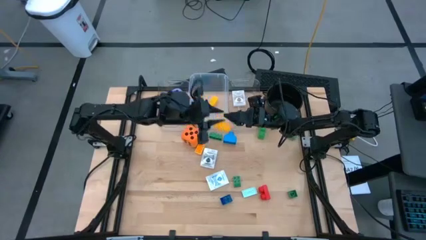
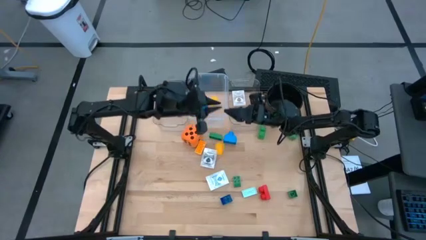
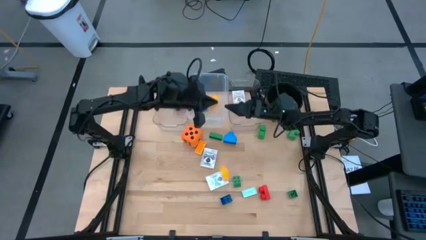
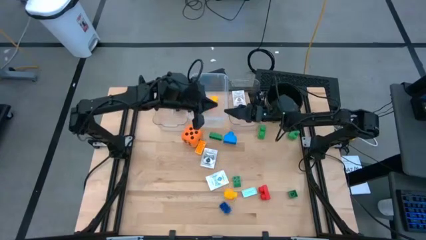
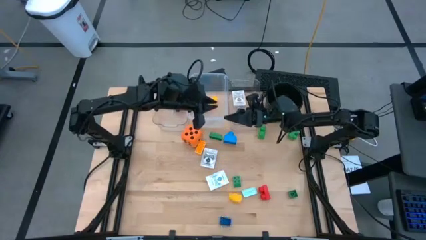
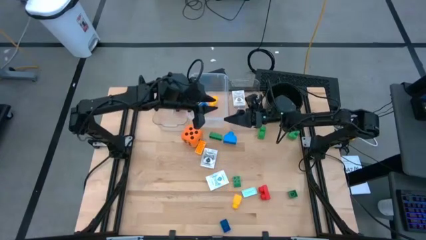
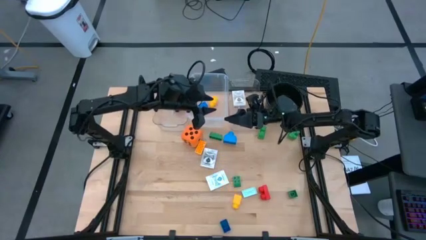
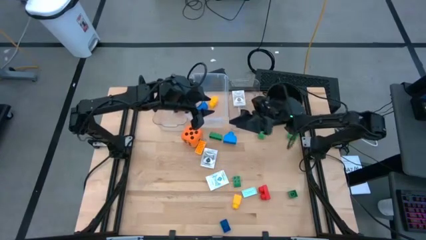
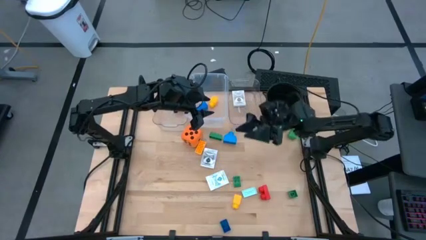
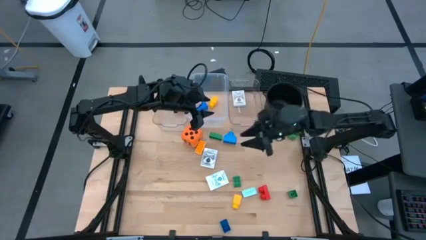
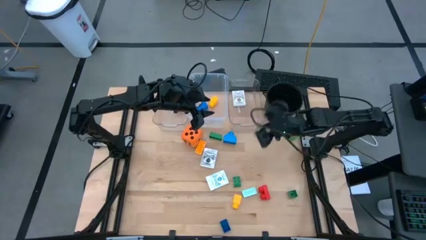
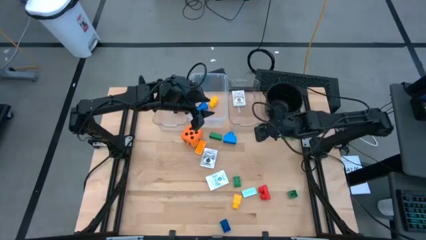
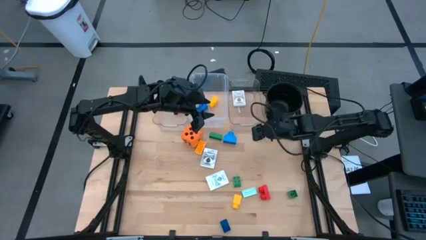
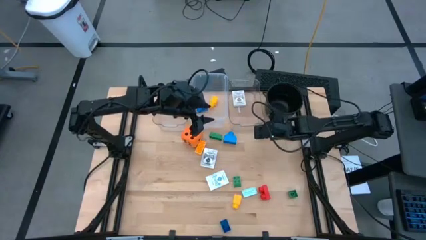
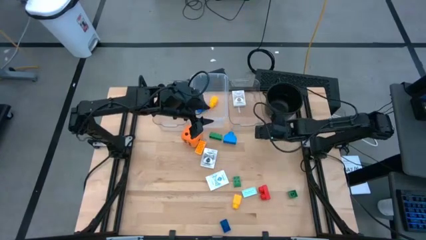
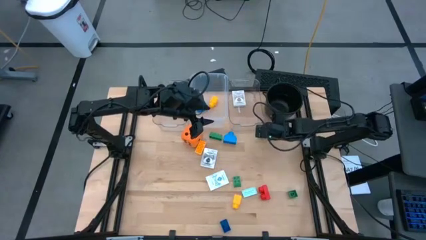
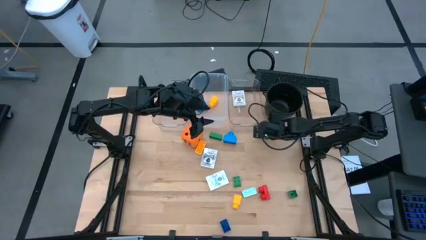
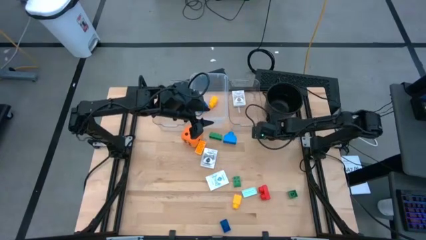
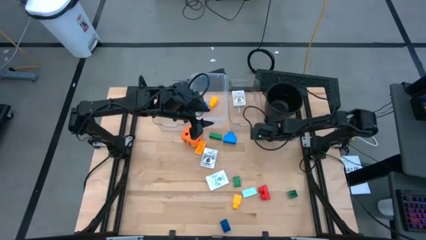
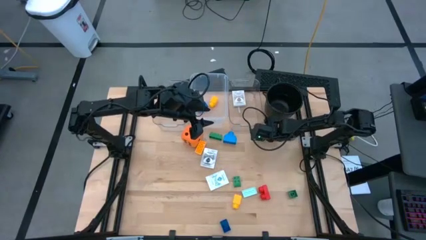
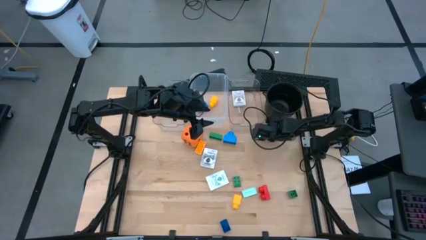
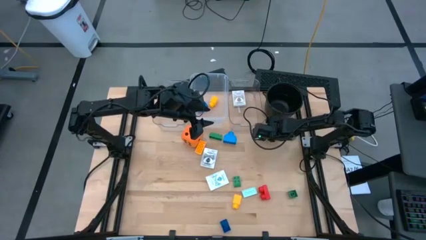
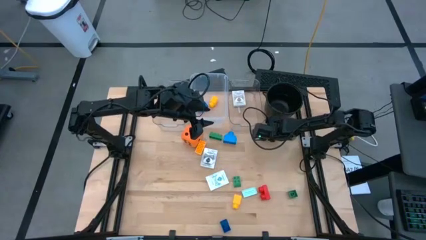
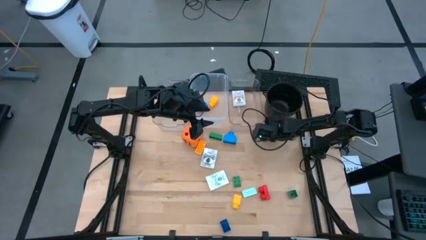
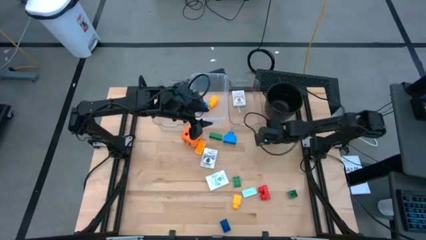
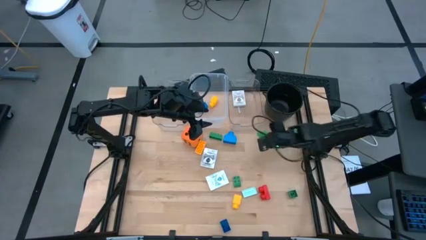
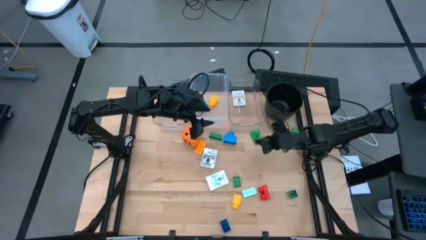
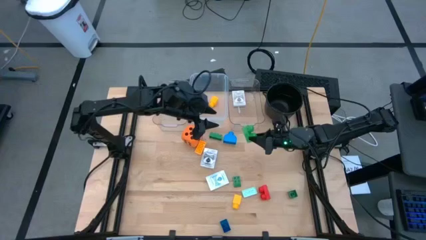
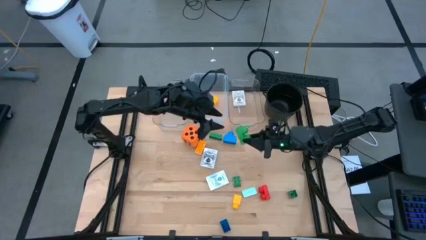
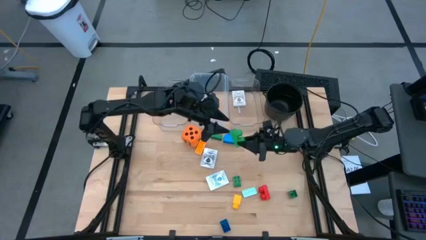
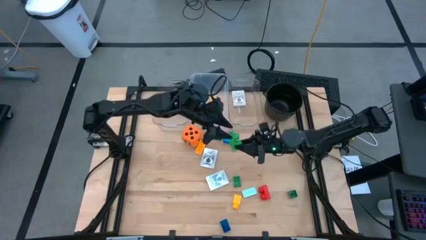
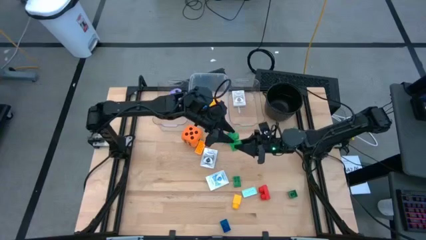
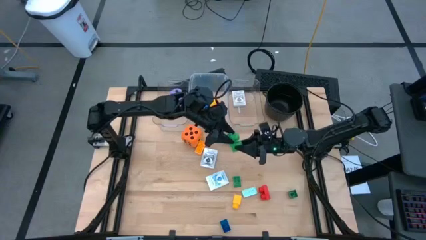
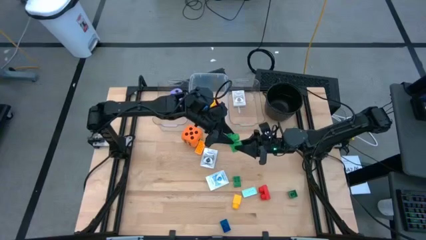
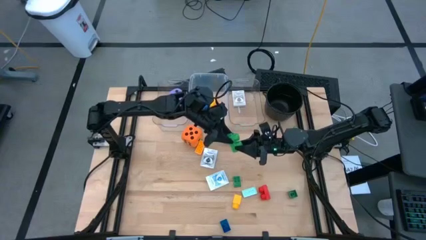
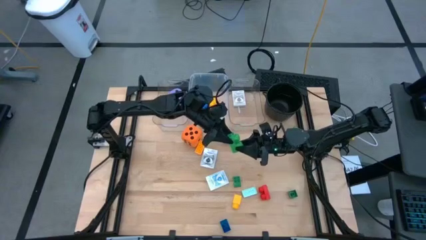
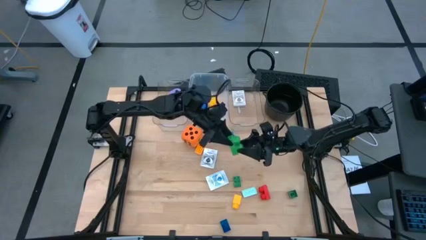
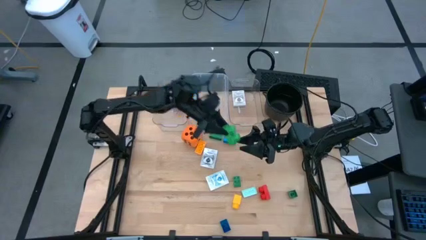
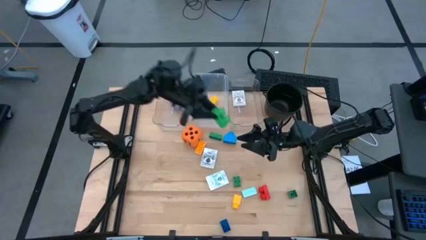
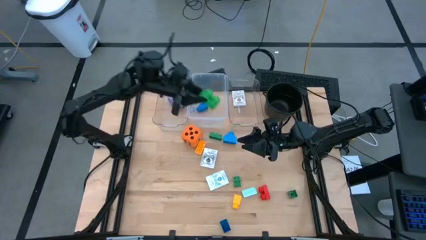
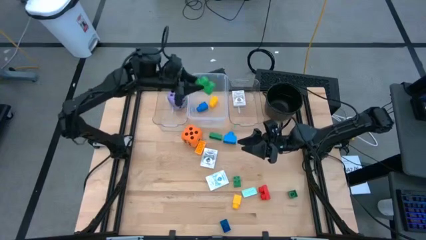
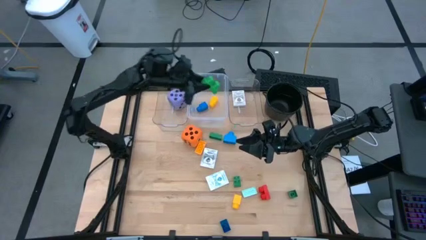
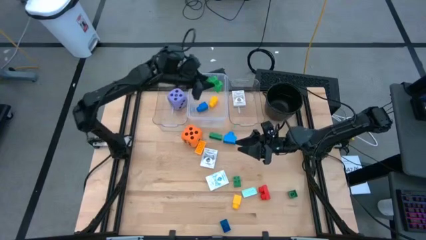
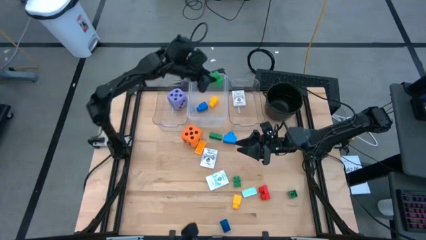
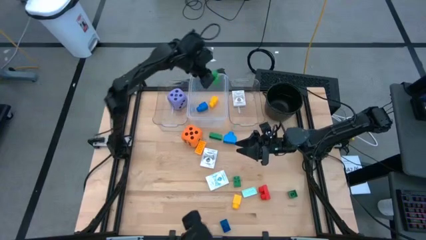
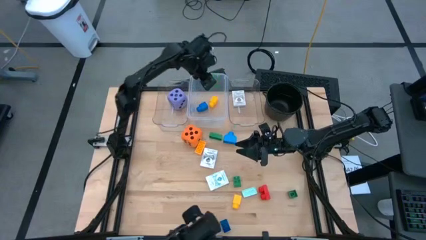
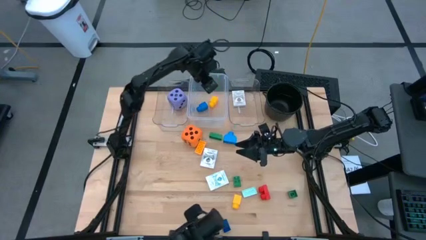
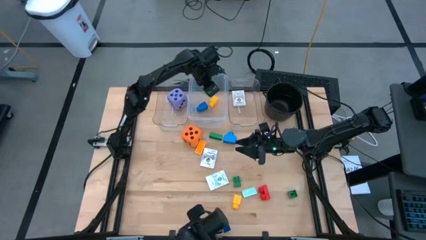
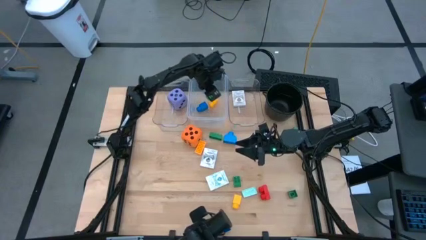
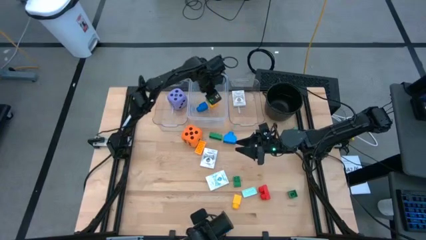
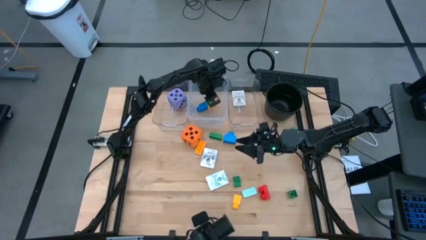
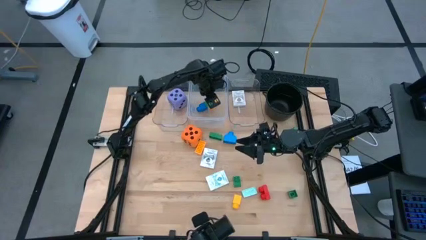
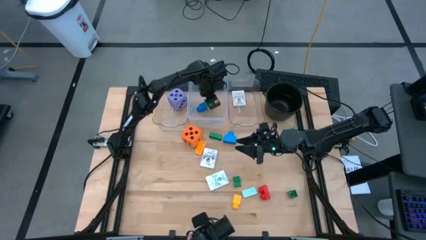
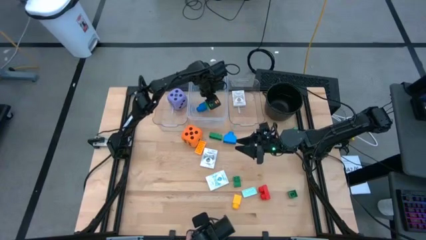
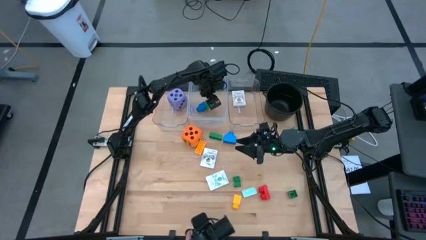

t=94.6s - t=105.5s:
Task: Pick & Place Toys
Put the green two stud game piece into the middle transparent bin

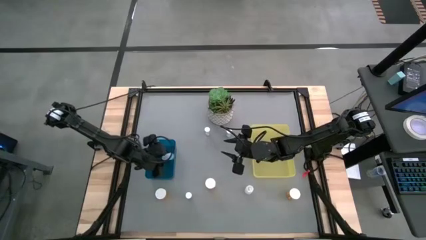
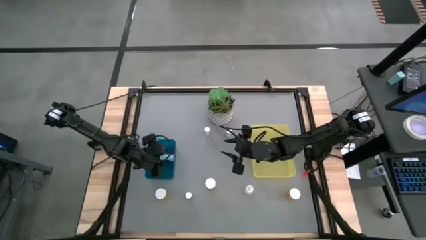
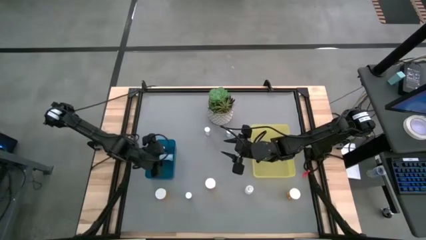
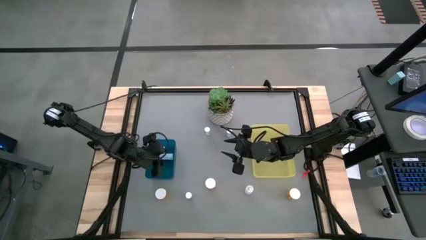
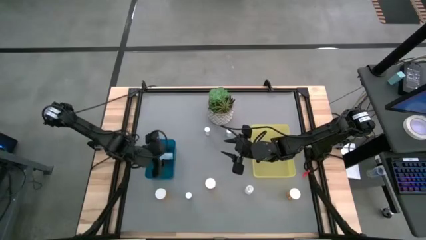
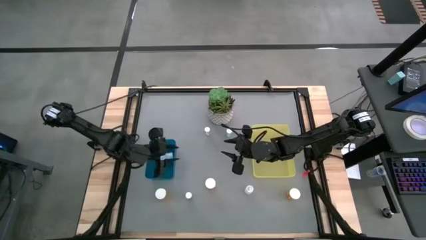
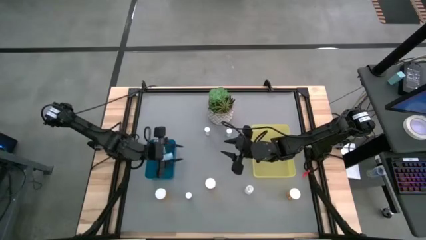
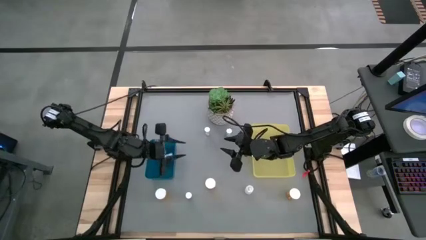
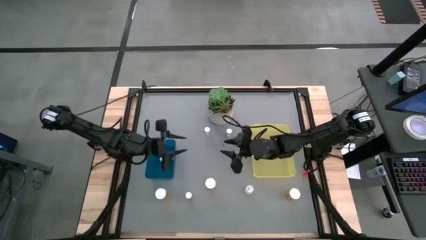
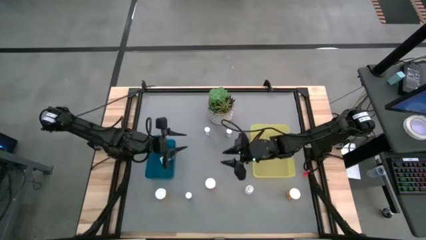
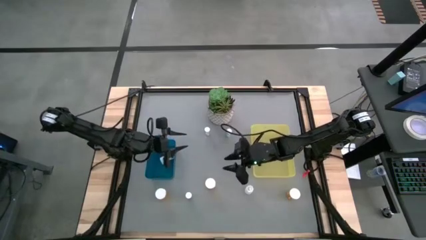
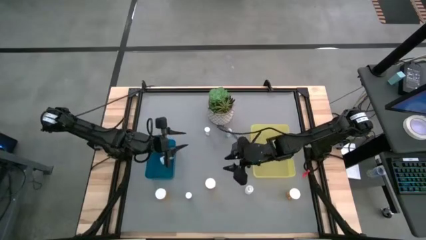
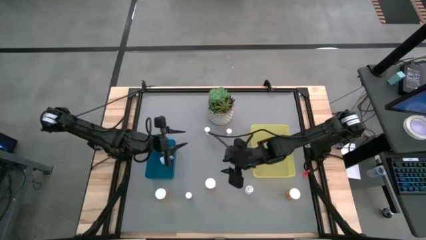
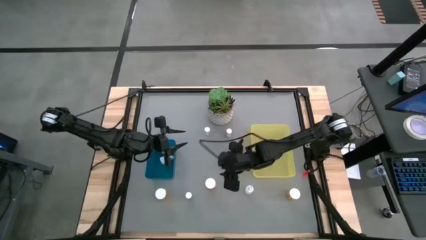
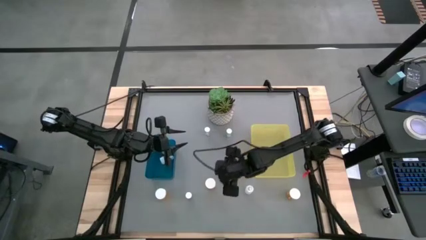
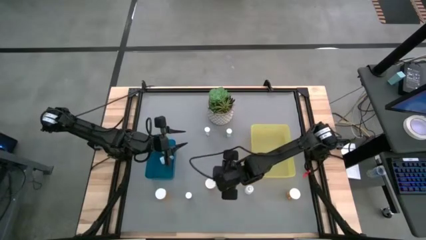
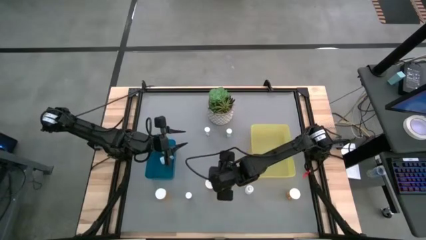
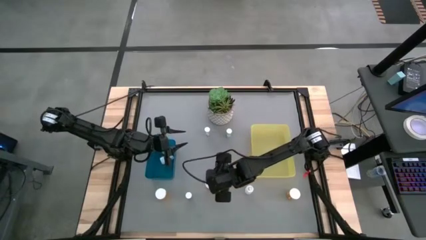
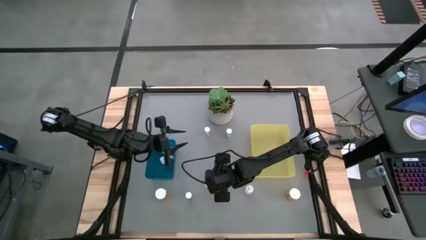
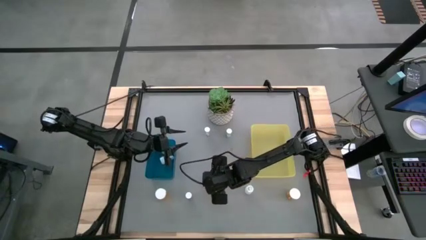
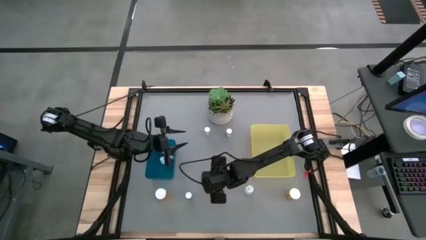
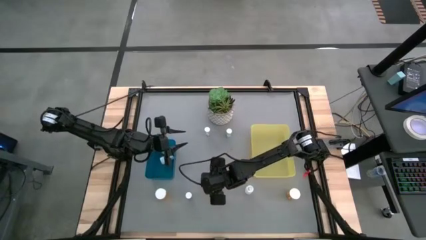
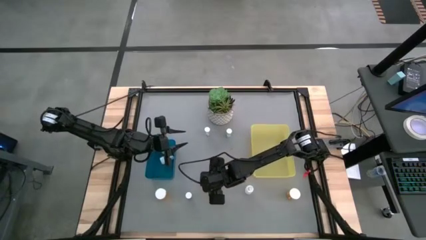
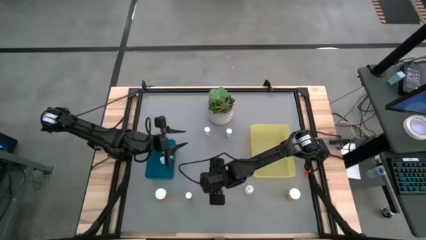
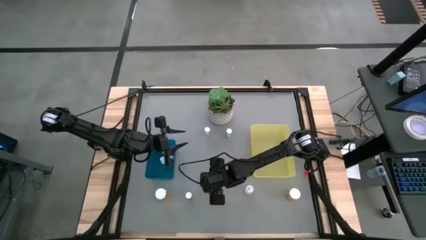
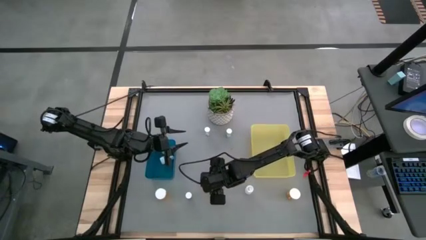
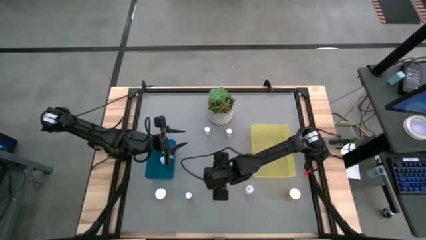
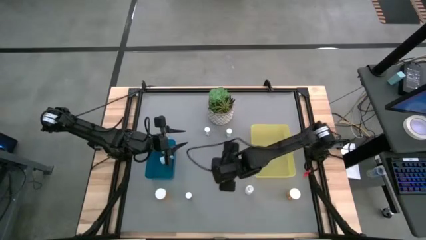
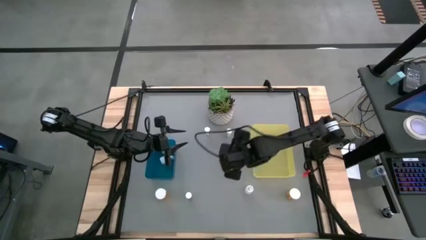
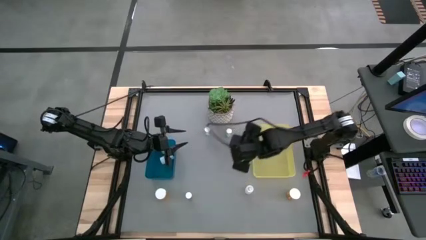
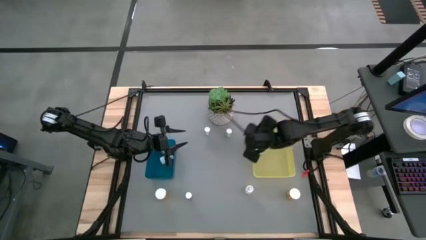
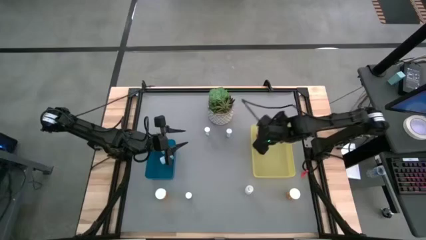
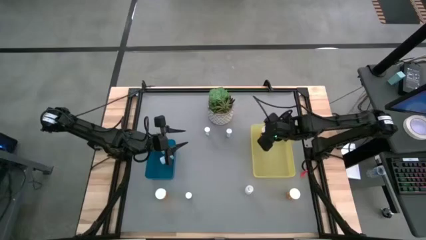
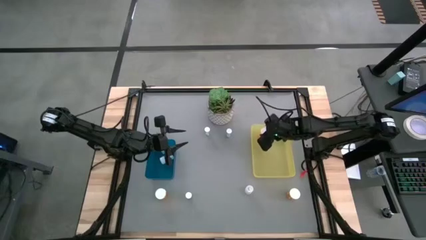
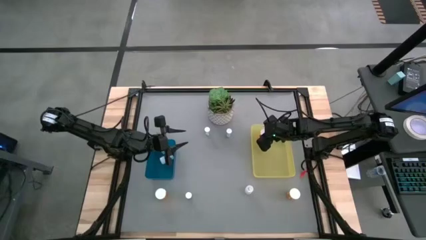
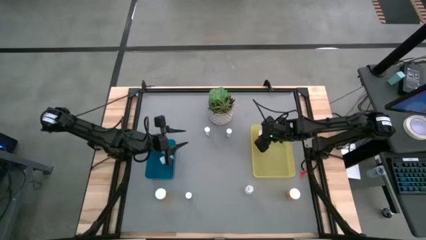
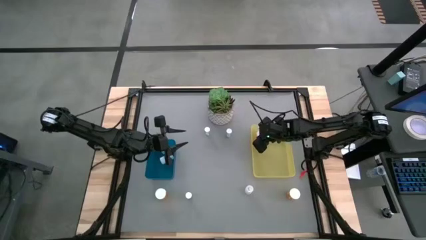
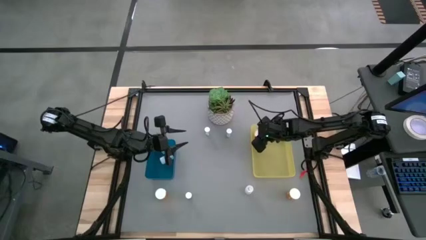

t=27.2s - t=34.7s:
Task: Pick and place medicine bottles into bin by pill shape (circle, oval)
Put the middle orange pill bottle into the right yellow bin
